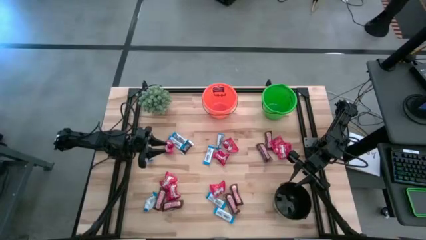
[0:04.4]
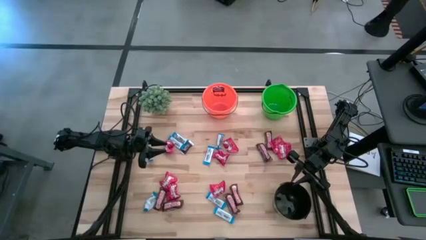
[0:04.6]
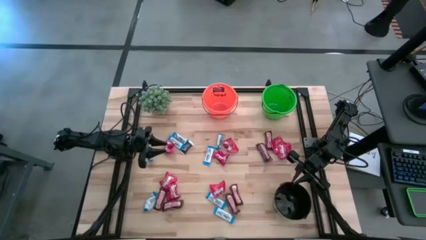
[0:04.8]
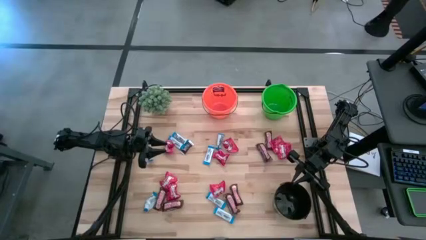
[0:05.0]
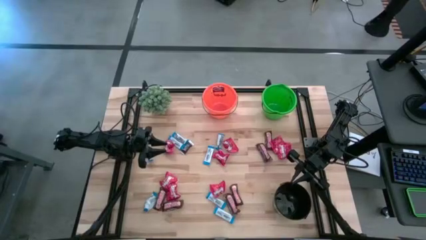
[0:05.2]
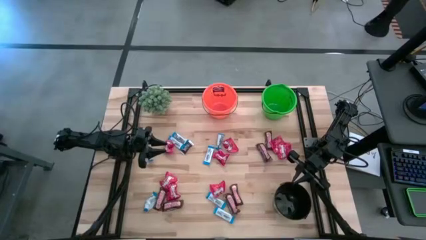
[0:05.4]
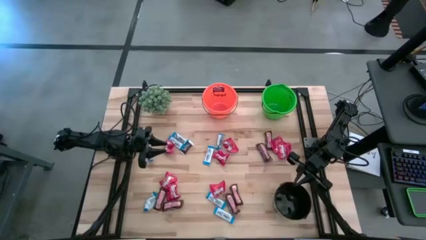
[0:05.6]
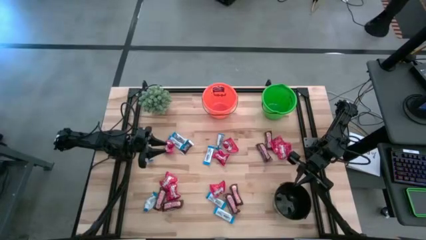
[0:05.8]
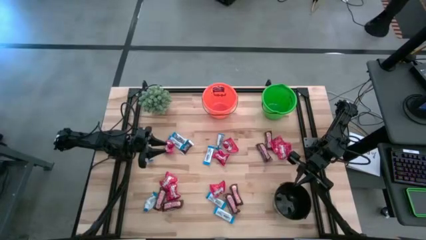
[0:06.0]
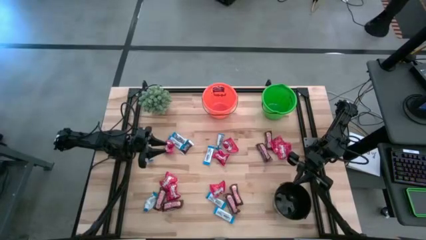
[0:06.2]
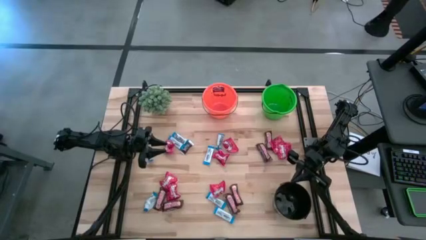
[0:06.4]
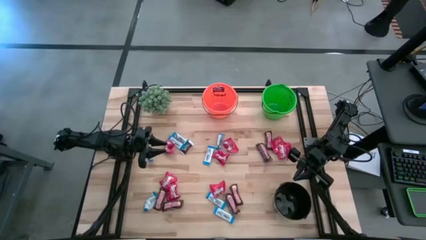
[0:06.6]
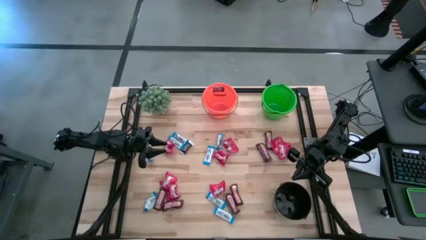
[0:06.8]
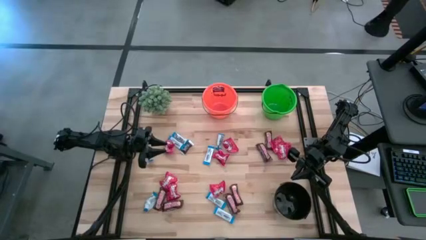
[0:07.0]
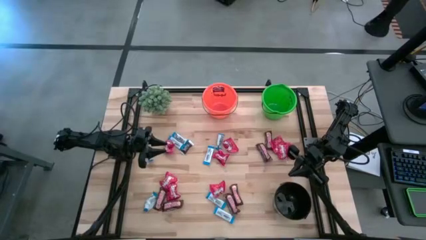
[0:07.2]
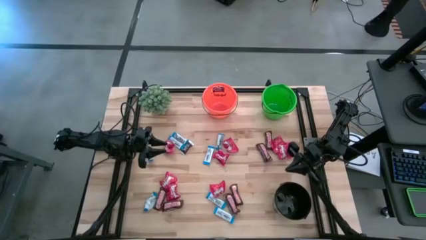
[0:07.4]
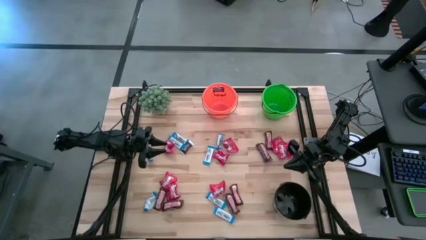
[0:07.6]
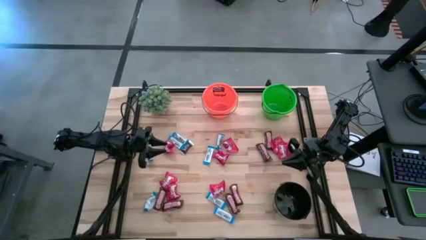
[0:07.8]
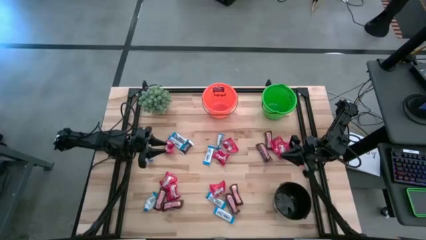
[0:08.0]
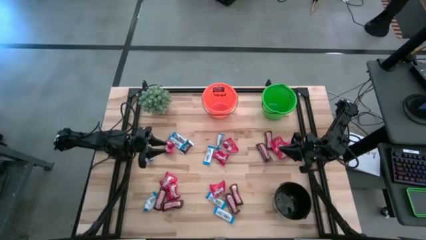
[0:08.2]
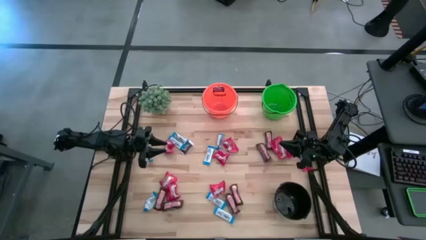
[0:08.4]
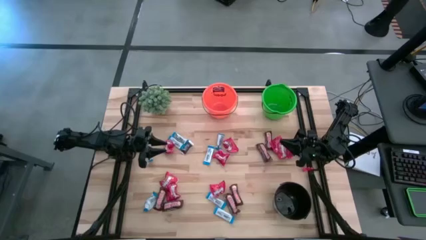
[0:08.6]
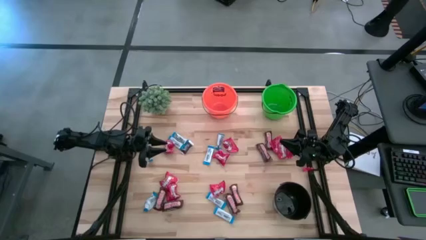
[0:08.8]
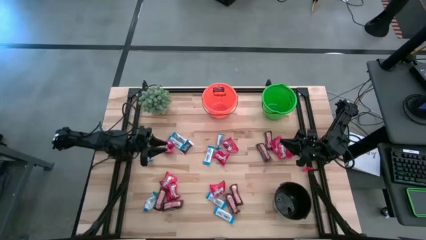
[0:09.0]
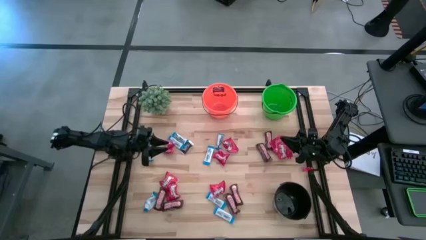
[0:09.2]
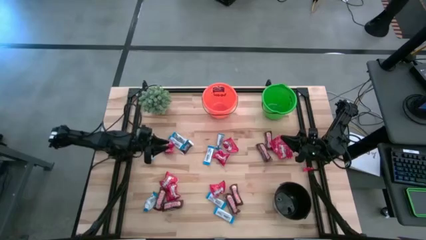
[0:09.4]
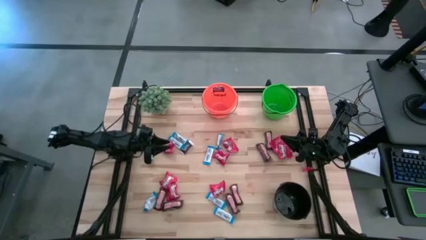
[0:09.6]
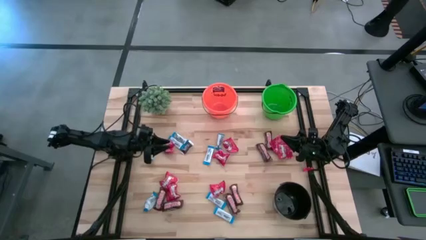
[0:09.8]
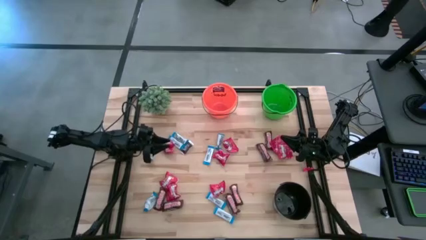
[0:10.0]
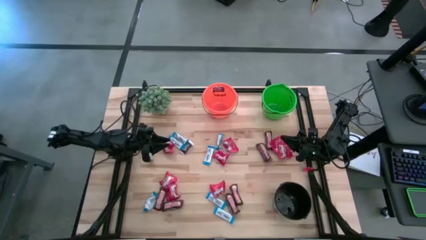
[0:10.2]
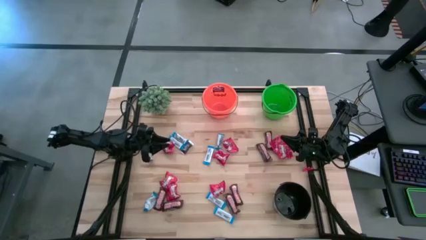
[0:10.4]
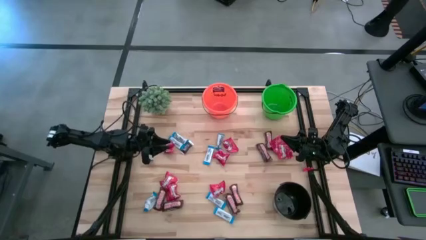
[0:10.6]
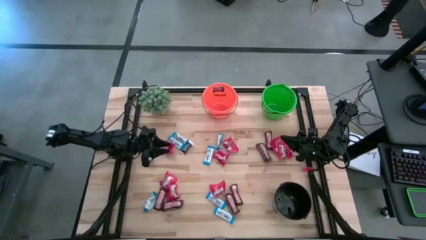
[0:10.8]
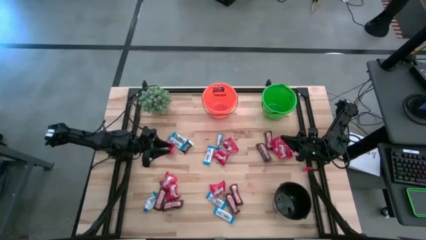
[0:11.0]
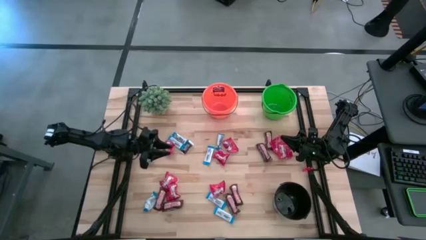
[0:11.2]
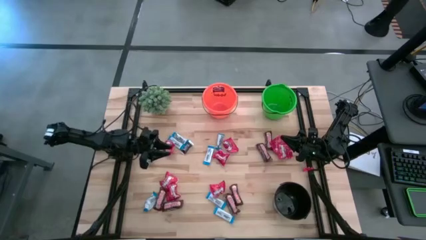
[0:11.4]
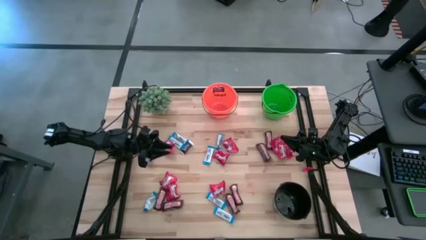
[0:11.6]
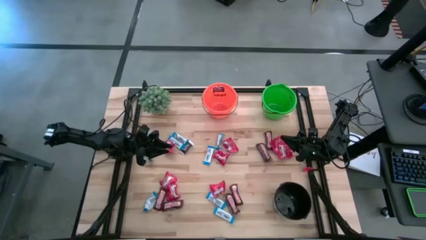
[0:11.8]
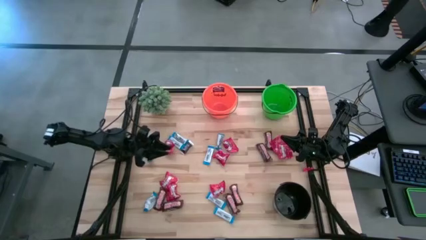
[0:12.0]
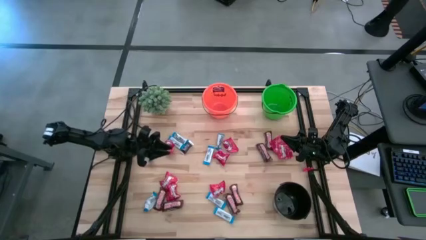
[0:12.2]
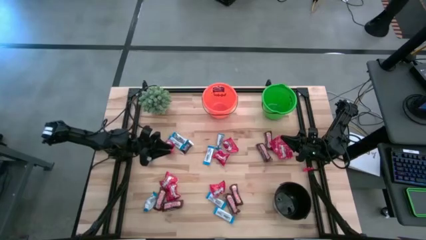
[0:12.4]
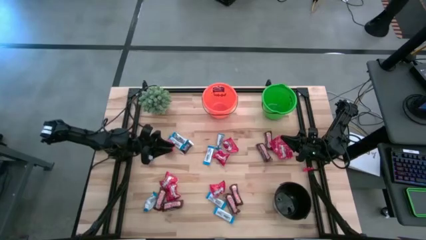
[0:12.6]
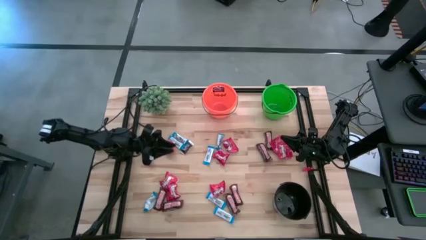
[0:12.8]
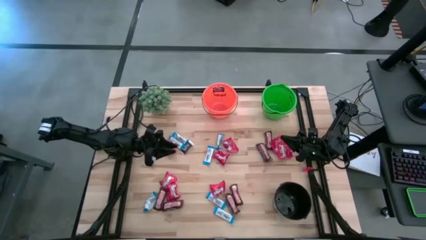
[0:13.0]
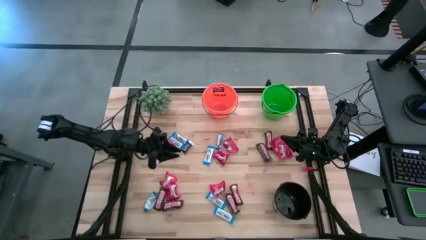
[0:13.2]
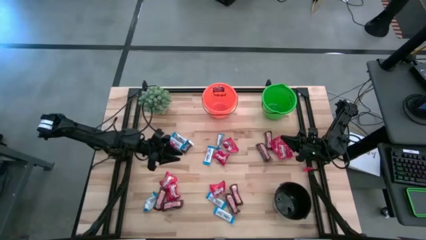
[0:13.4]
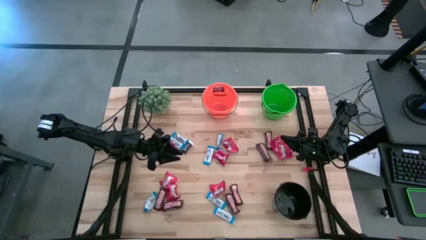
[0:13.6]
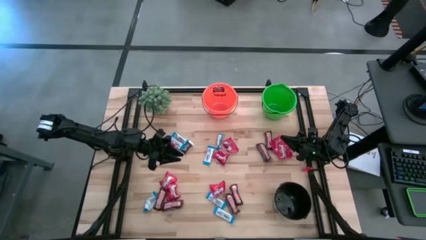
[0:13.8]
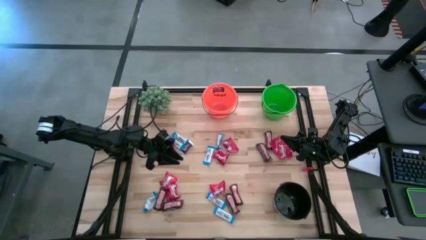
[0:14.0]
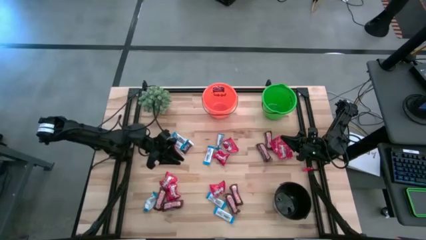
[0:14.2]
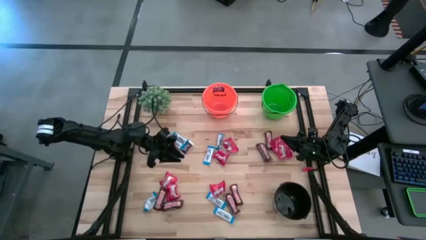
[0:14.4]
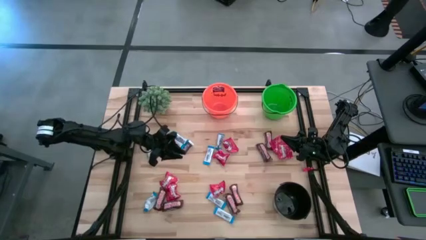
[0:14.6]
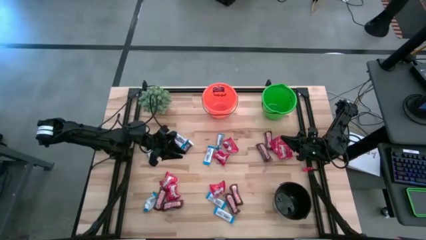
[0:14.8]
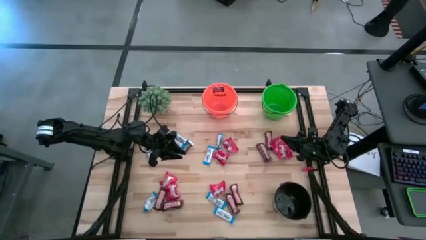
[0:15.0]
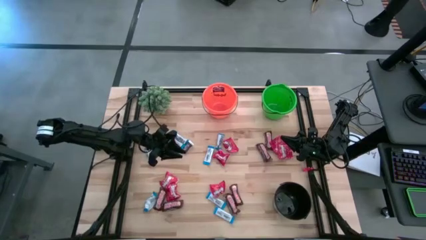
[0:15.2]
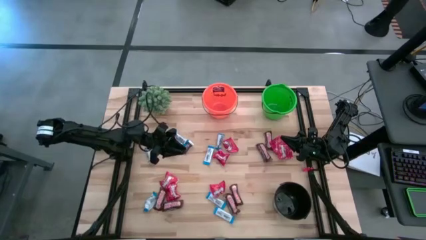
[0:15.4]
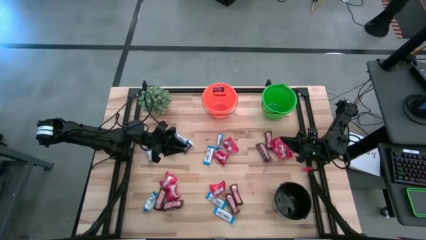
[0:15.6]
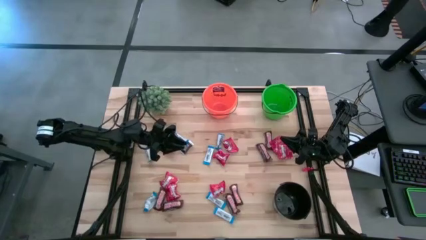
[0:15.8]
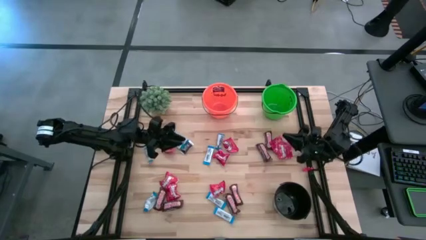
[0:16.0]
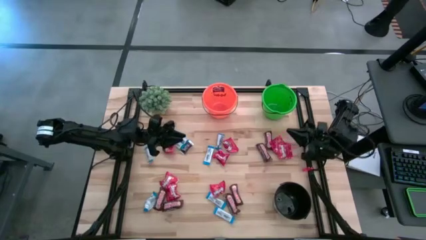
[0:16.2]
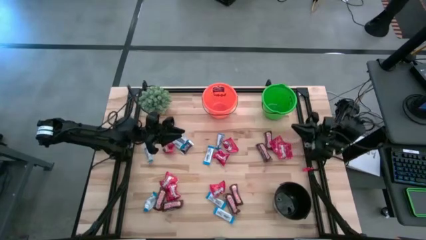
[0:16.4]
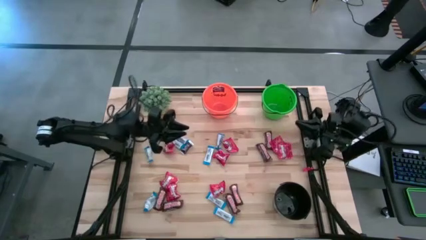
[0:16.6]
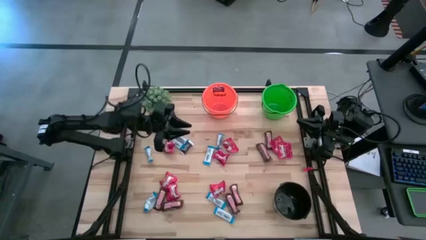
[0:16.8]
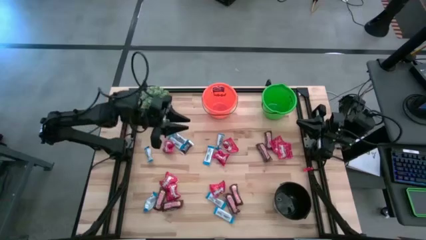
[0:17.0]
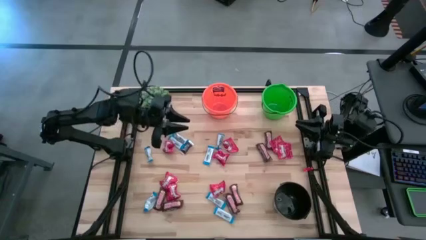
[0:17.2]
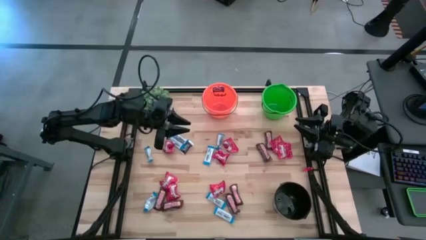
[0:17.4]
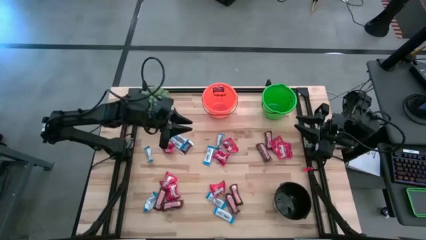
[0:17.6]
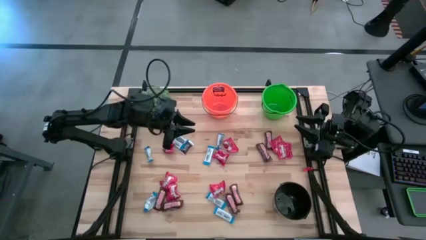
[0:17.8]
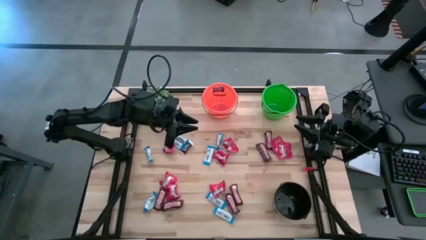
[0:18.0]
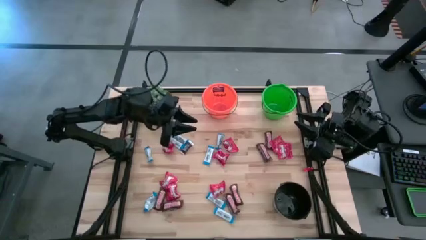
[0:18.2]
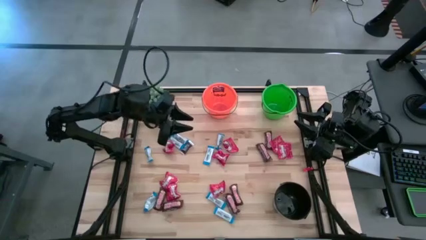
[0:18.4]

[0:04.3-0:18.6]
Task: Organize candy in baskets
Put the black chocolate into the green bucket

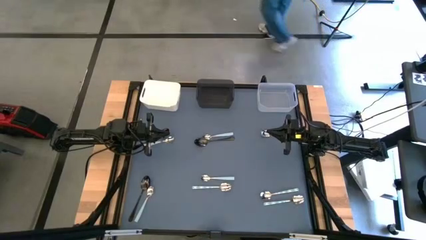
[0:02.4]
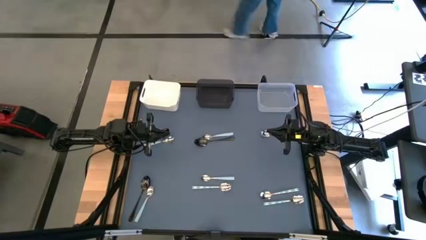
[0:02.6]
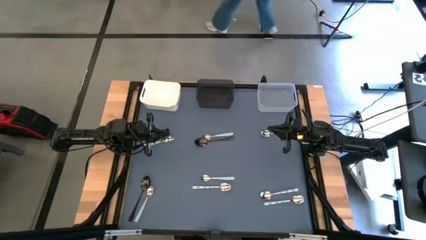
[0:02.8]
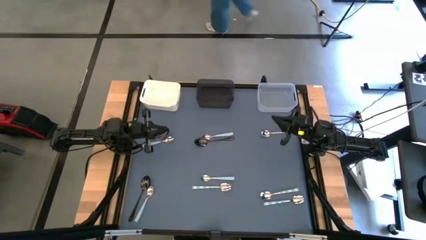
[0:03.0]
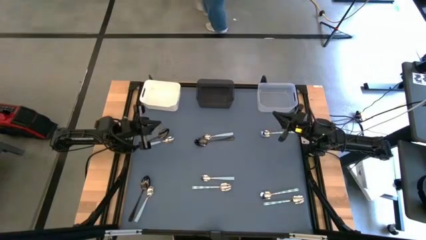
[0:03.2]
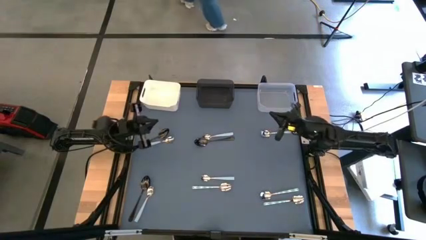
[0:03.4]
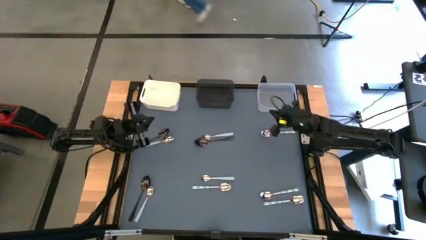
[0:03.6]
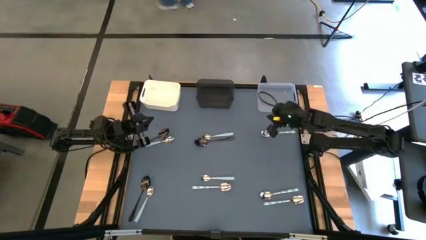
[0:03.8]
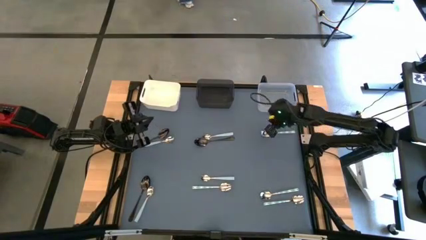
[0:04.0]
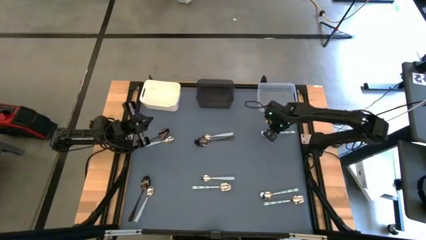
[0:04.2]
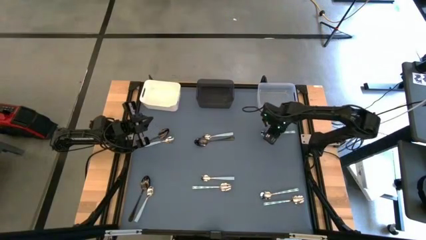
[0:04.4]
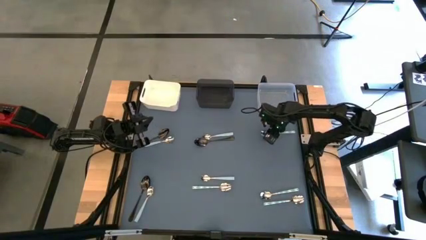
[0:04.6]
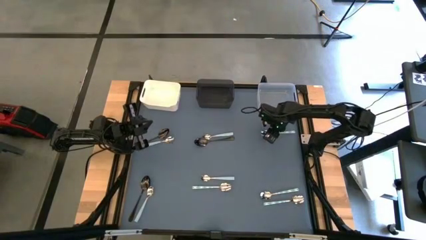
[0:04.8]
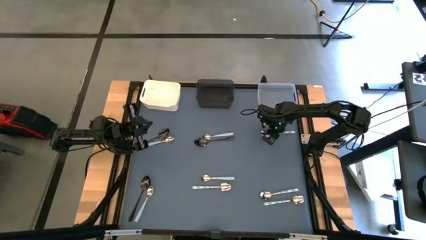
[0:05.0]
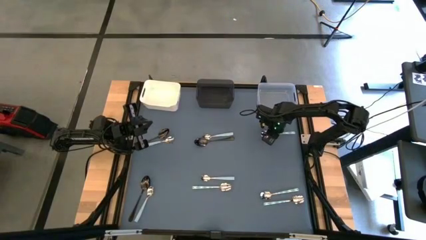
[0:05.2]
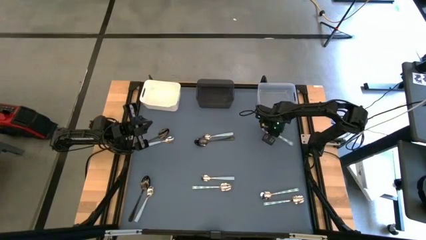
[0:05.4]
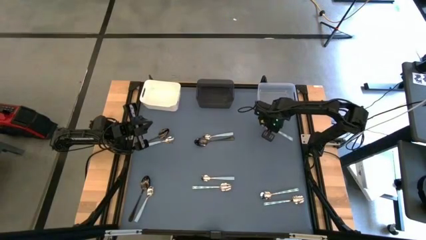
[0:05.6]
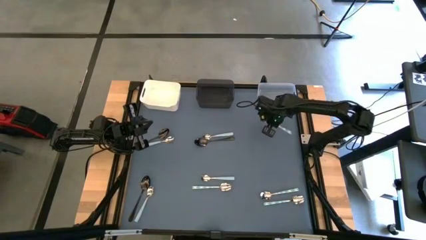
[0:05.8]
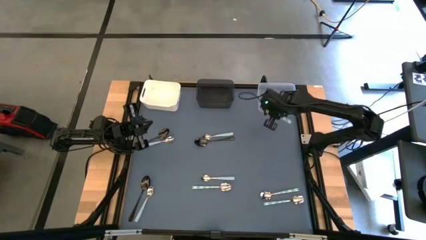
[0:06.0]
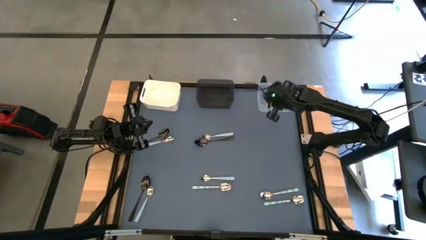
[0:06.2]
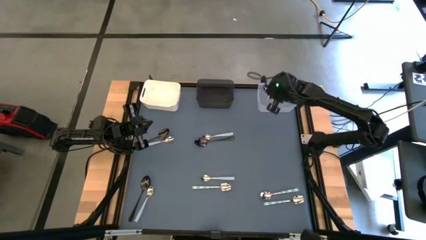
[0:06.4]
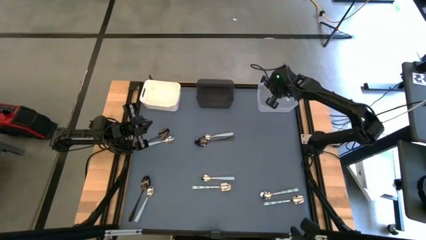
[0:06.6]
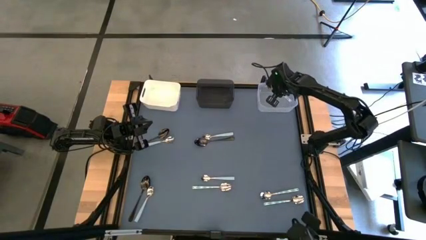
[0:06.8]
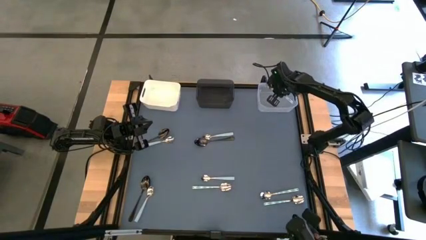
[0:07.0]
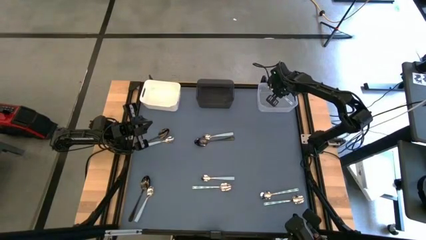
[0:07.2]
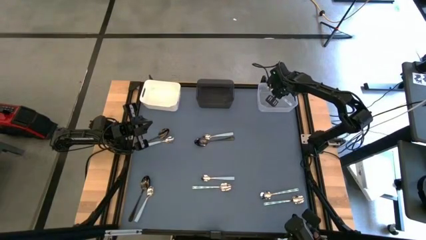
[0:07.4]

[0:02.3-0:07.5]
Task: Sort silverware by color (type)
Put the top right white and blue patterned spoon into the transparent bin
